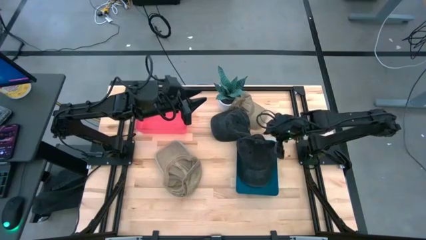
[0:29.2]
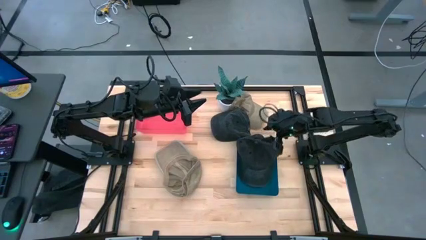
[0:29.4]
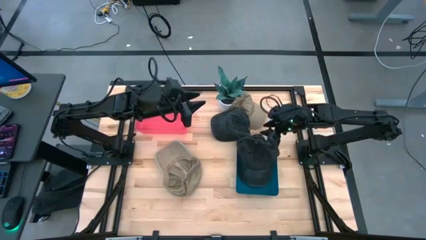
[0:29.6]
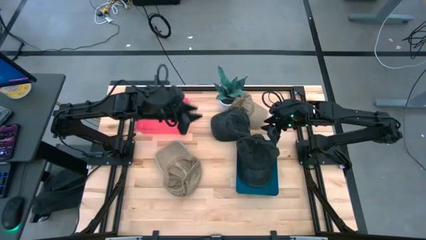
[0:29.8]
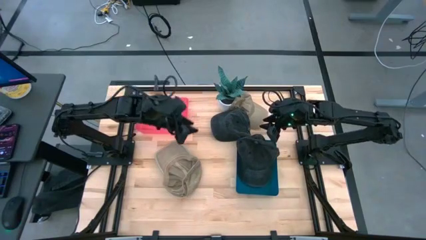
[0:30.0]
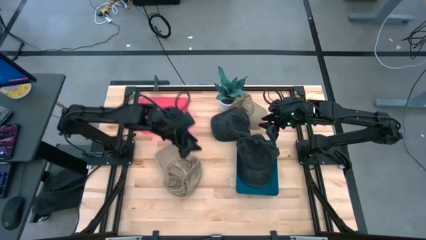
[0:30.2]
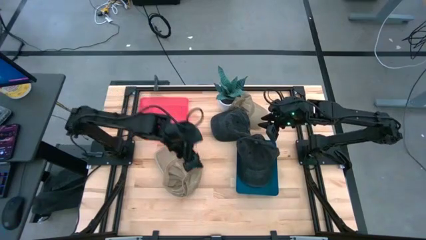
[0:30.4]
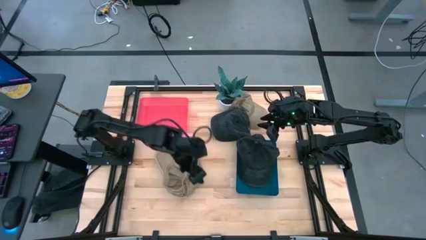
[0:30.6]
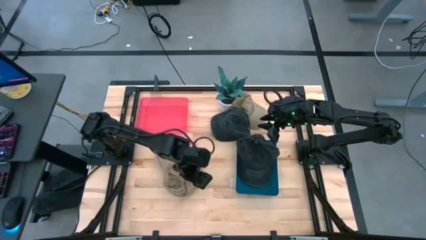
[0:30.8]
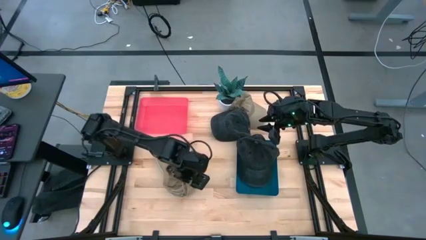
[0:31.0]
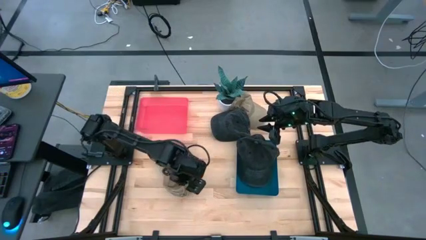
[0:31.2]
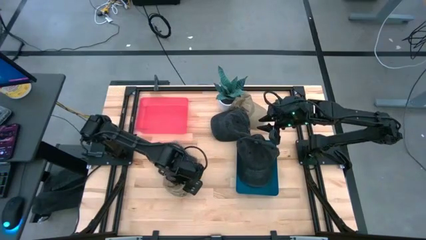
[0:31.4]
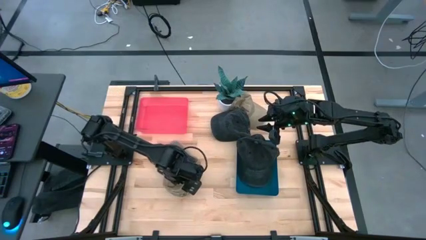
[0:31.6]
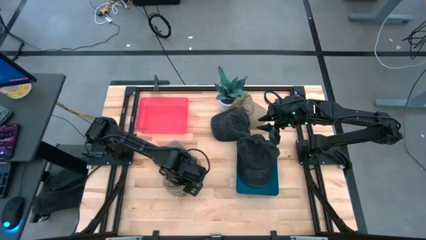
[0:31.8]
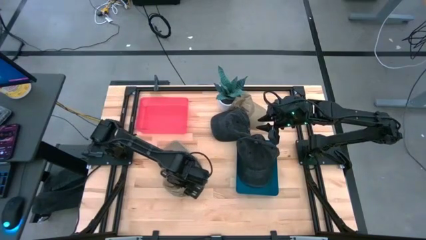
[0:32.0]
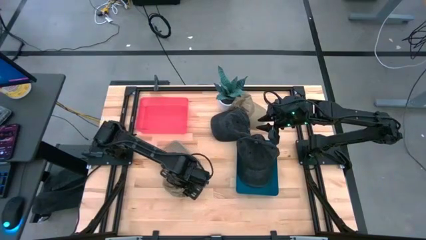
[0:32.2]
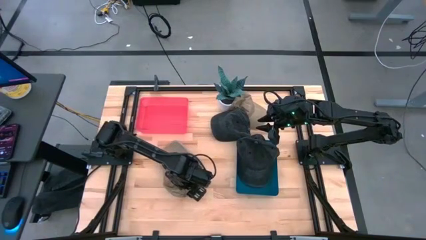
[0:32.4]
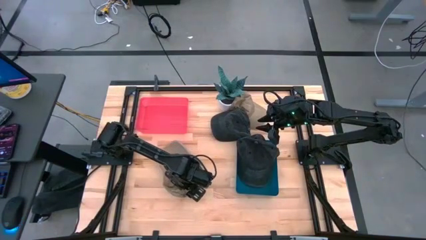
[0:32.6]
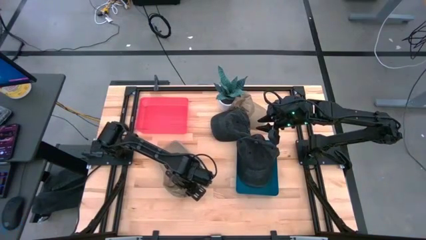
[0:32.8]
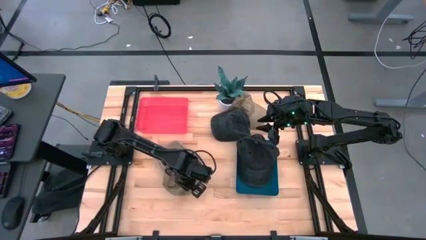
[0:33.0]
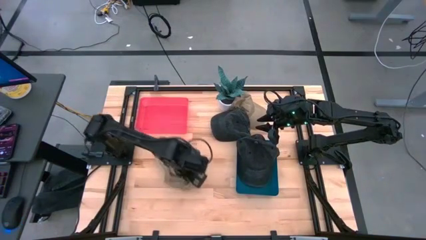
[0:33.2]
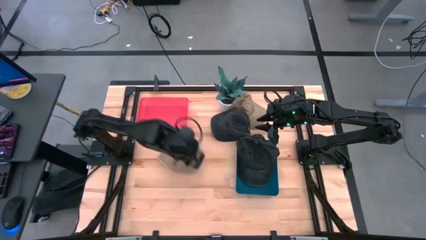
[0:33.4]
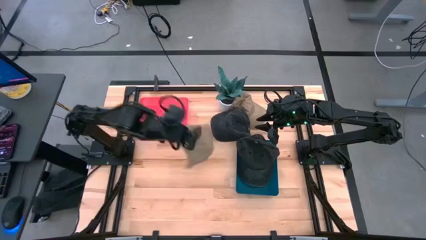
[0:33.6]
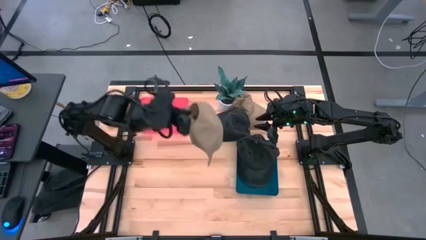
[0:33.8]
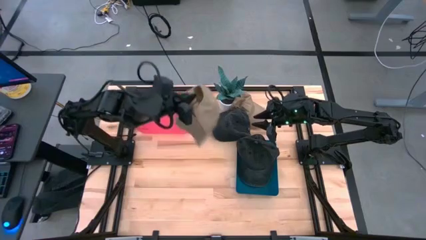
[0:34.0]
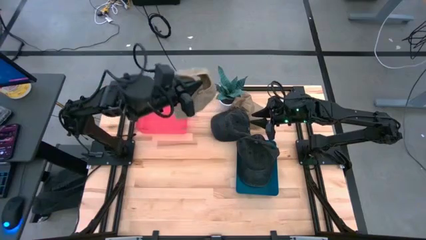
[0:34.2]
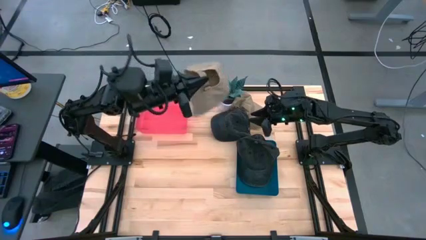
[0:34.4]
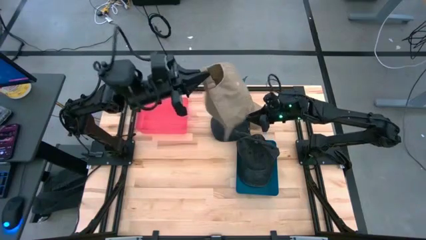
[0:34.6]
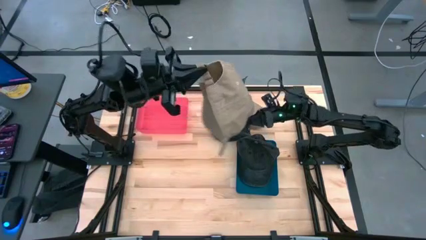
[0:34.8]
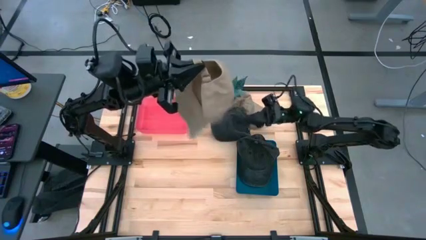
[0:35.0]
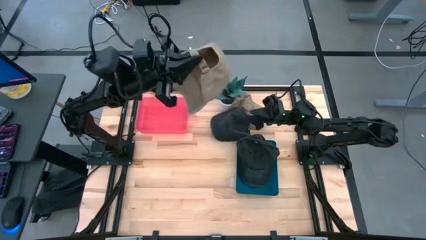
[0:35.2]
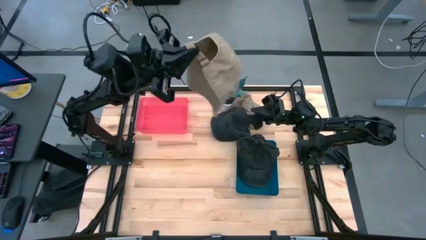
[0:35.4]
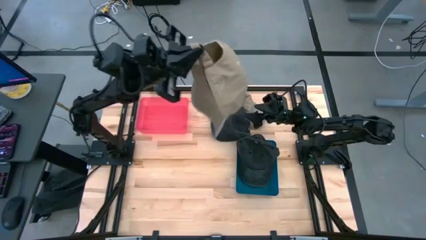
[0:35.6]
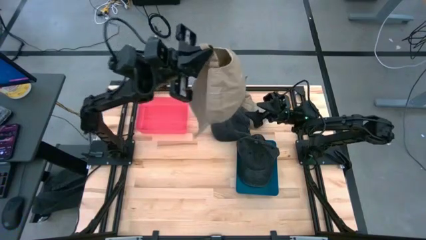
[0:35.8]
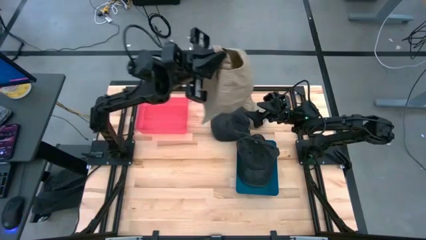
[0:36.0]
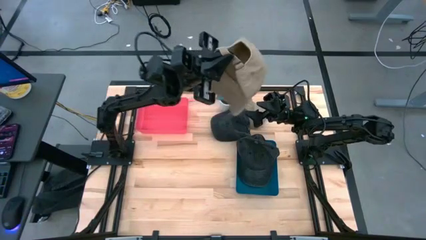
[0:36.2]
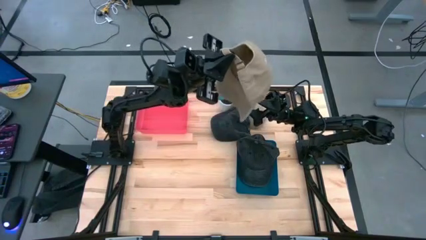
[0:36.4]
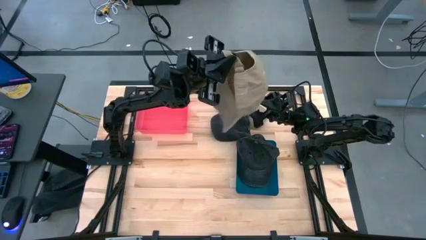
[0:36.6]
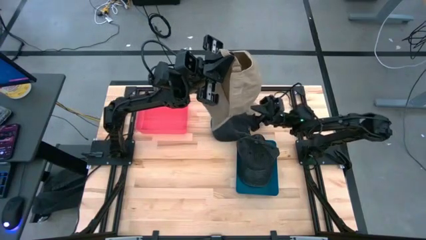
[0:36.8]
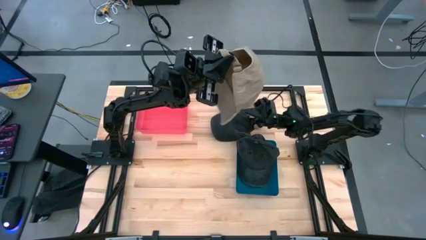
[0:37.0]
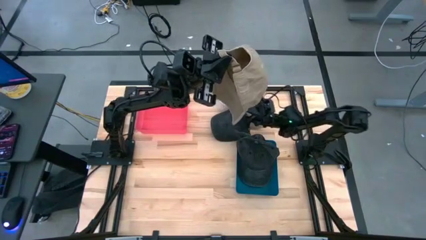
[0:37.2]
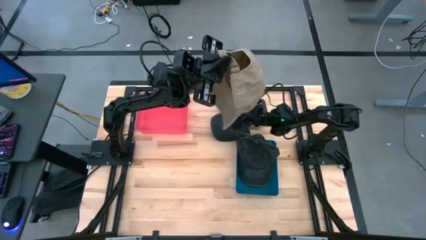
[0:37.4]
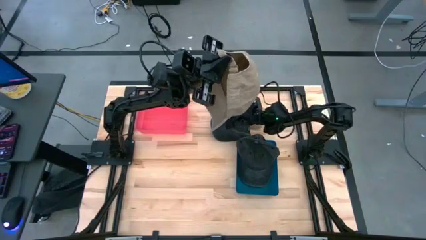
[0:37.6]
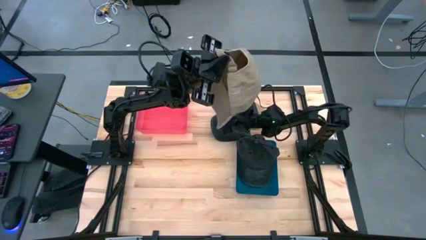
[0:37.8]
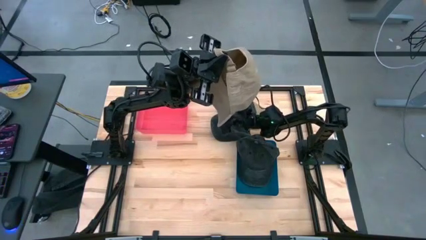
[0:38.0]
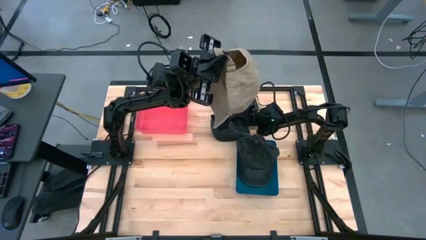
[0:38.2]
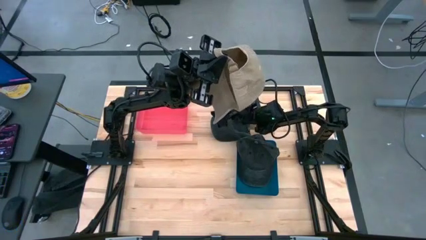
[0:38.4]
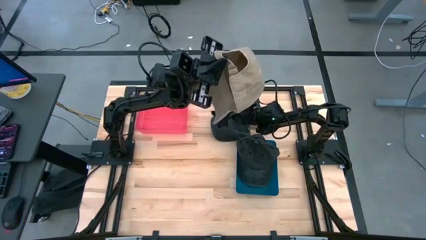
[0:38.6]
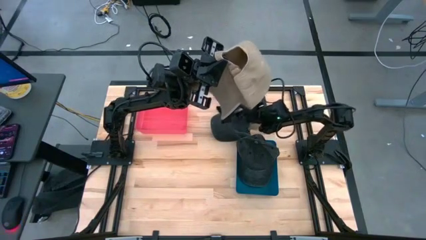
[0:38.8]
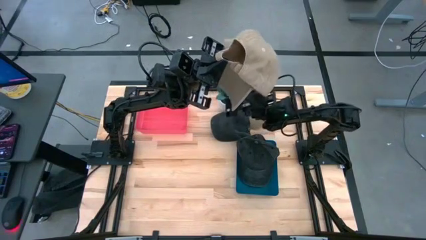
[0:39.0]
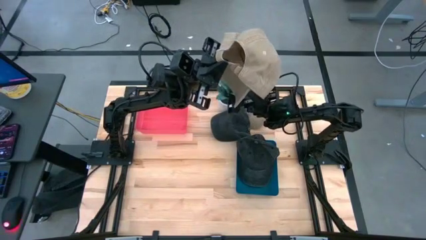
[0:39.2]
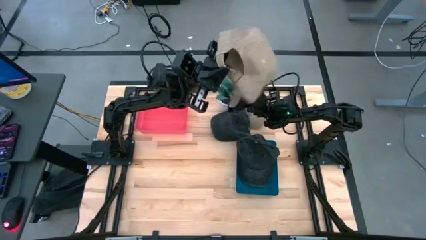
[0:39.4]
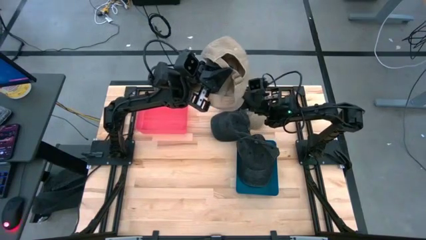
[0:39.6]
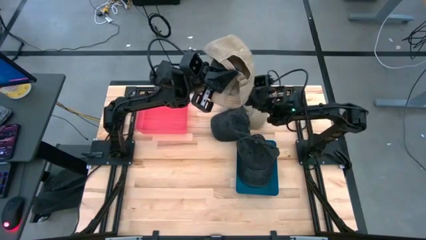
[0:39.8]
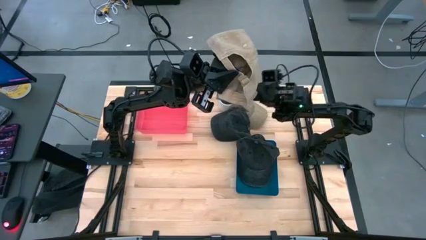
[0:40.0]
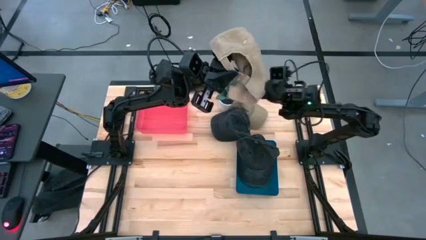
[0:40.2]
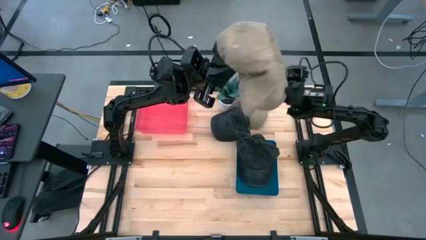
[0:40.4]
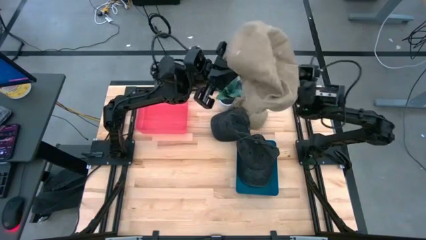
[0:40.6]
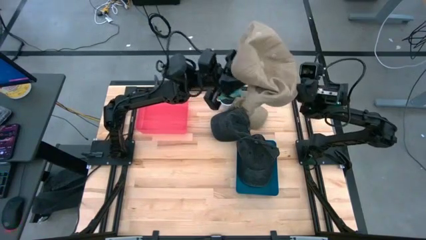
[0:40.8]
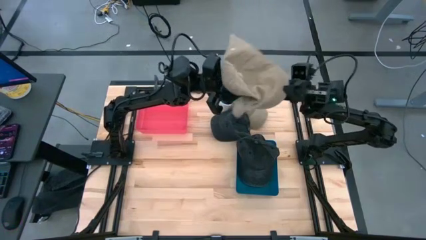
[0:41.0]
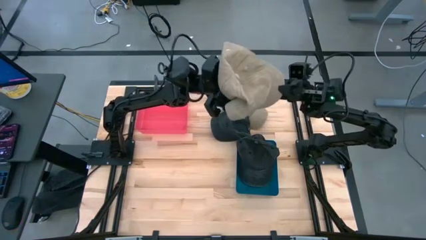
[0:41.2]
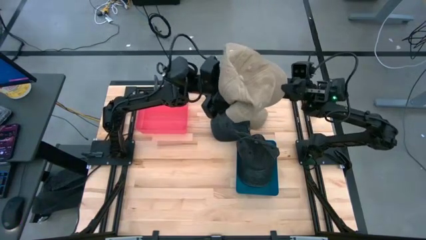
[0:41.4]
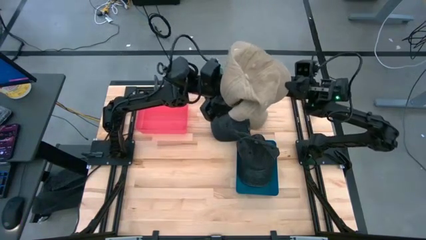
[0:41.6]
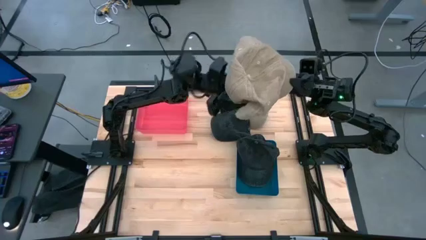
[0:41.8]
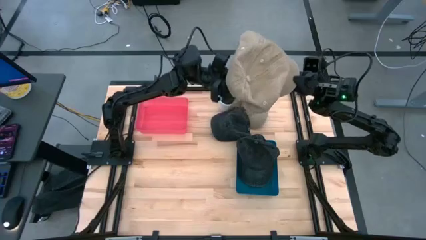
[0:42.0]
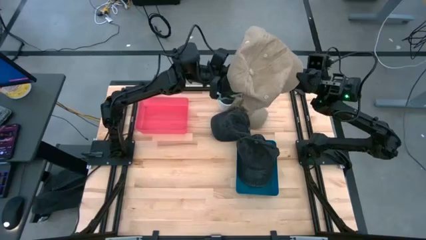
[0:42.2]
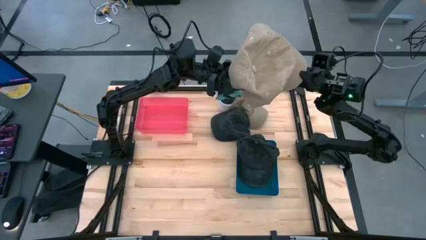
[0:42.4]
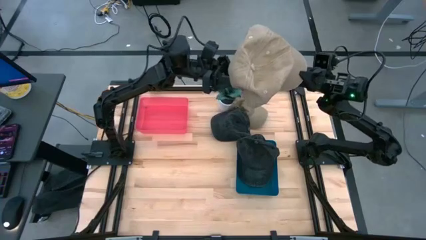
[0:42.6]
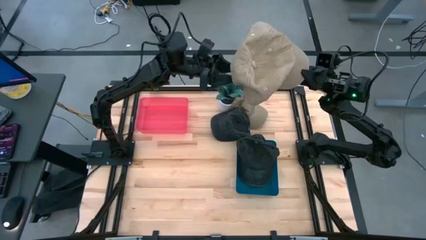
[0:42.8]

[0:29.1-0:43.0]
Task: Pick & Place hat
Put the bottom brown cap into the pink bin
